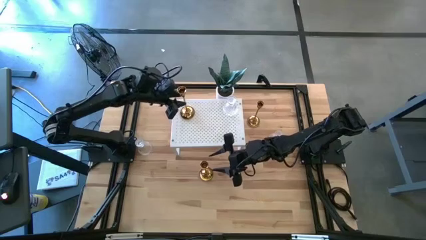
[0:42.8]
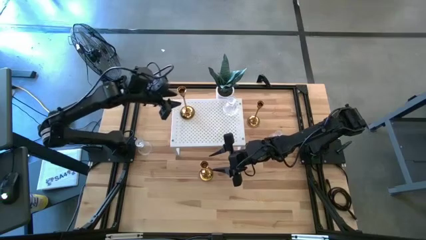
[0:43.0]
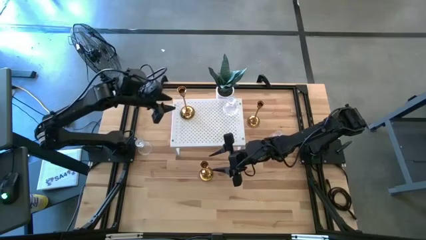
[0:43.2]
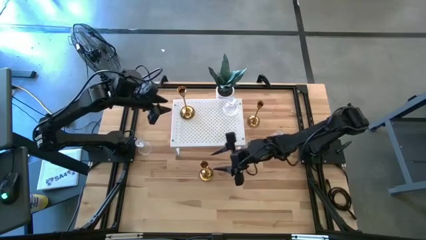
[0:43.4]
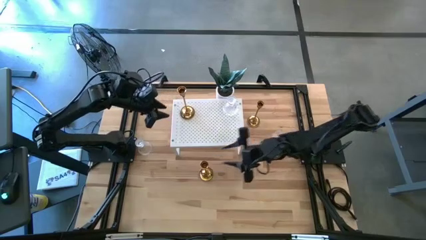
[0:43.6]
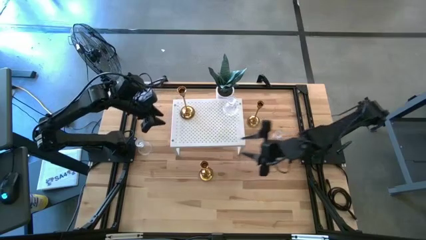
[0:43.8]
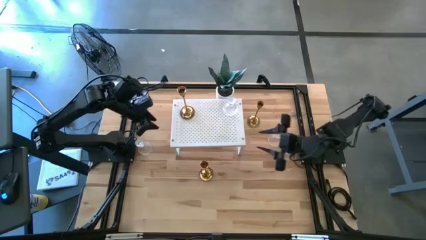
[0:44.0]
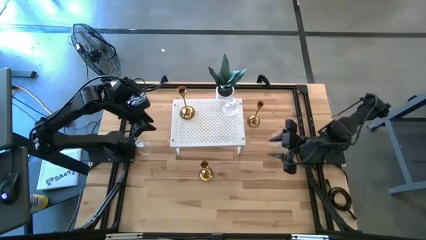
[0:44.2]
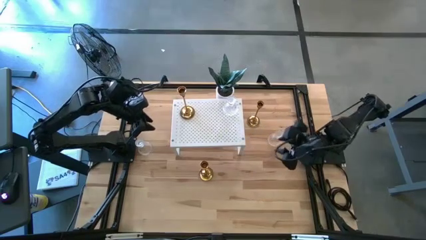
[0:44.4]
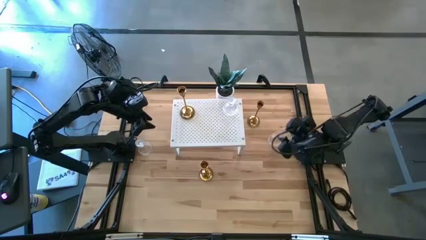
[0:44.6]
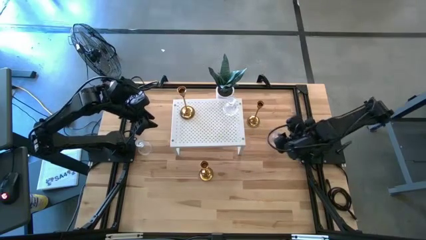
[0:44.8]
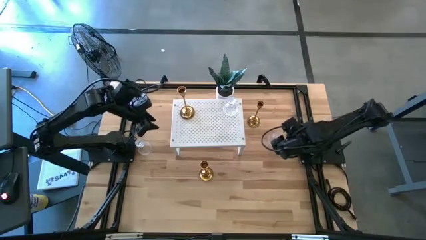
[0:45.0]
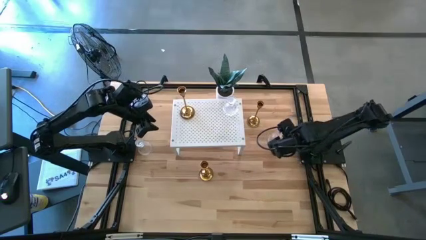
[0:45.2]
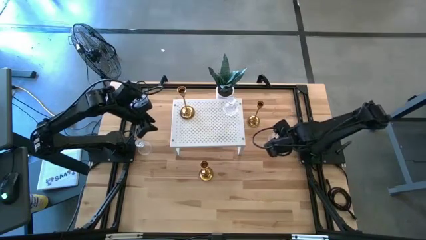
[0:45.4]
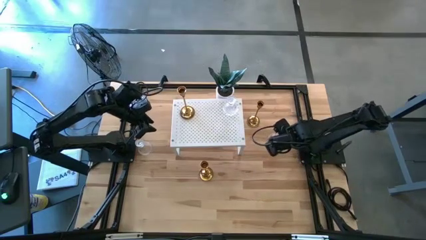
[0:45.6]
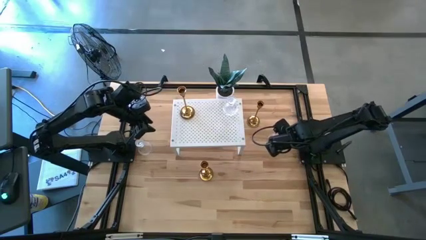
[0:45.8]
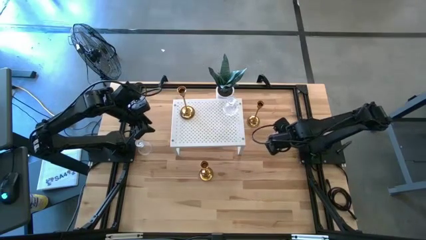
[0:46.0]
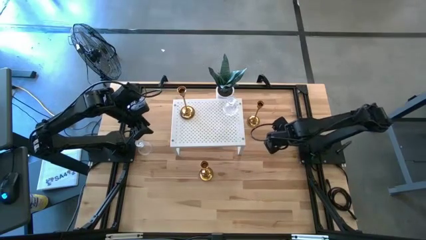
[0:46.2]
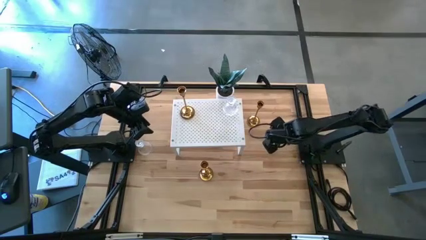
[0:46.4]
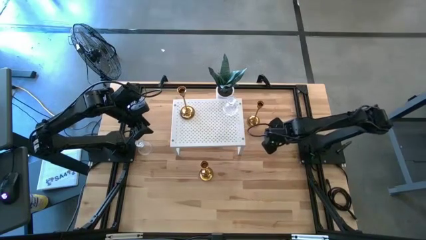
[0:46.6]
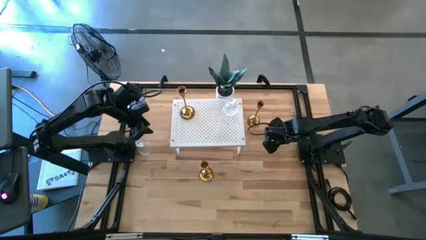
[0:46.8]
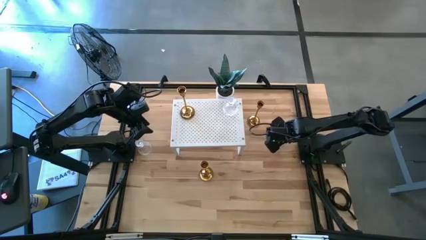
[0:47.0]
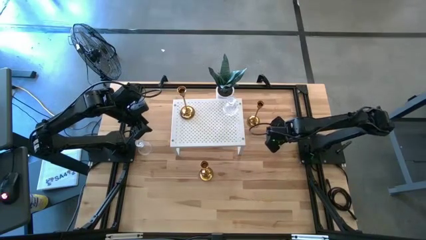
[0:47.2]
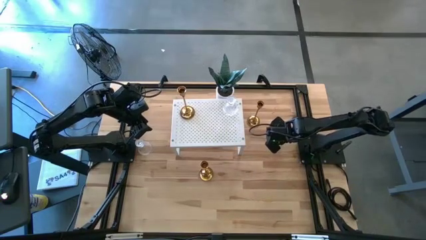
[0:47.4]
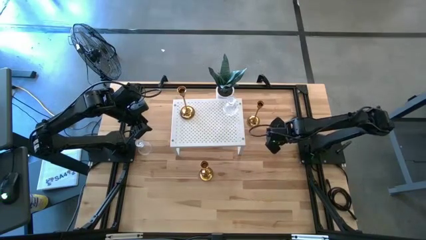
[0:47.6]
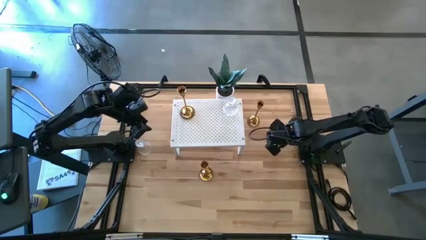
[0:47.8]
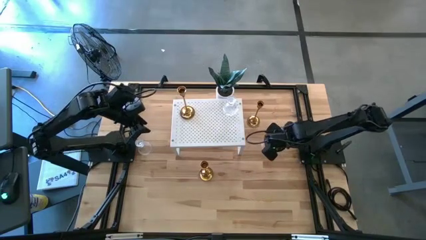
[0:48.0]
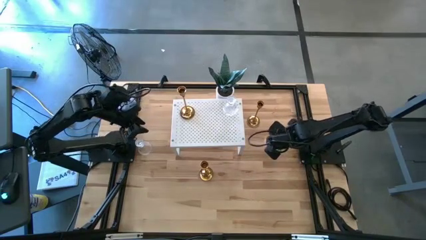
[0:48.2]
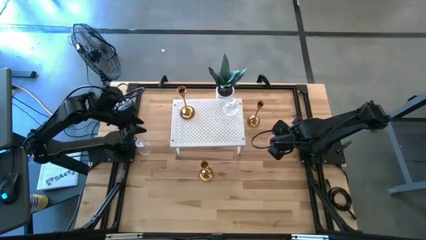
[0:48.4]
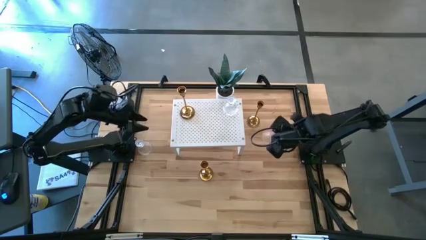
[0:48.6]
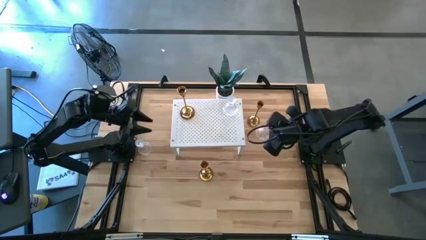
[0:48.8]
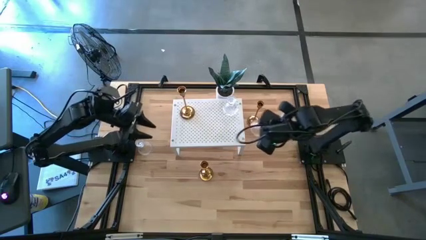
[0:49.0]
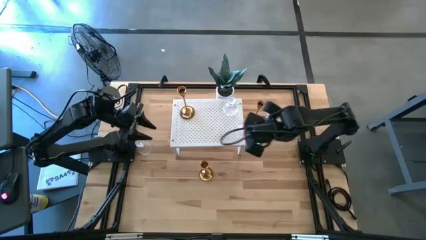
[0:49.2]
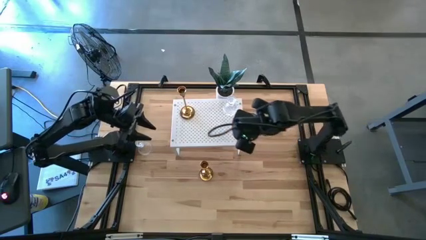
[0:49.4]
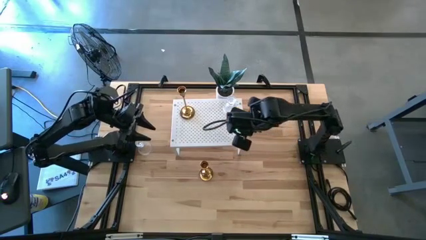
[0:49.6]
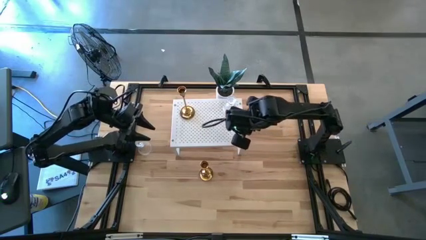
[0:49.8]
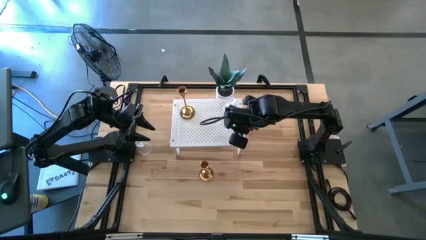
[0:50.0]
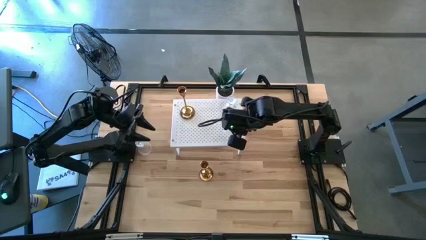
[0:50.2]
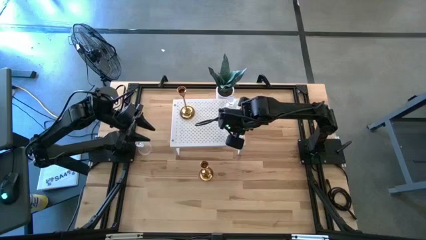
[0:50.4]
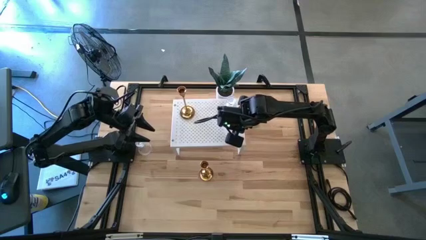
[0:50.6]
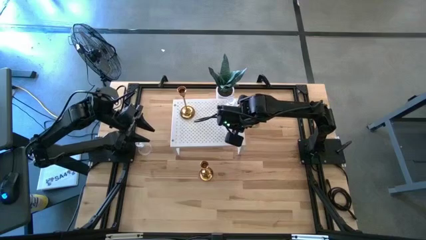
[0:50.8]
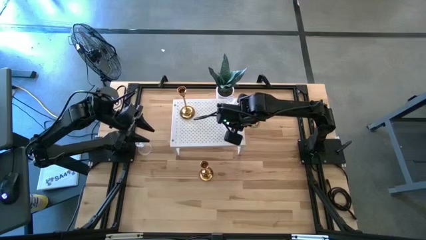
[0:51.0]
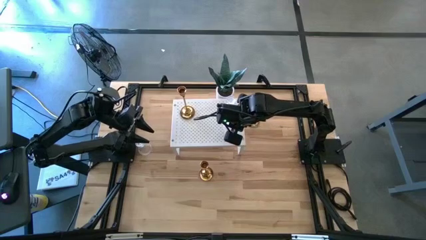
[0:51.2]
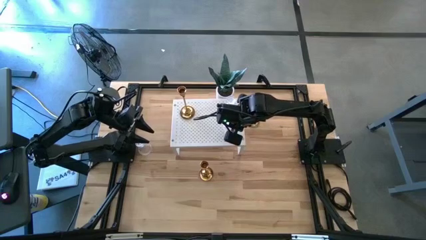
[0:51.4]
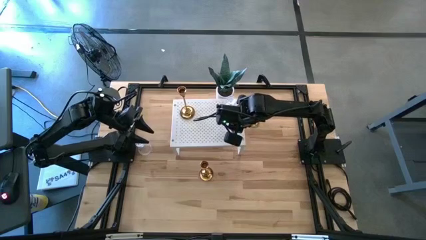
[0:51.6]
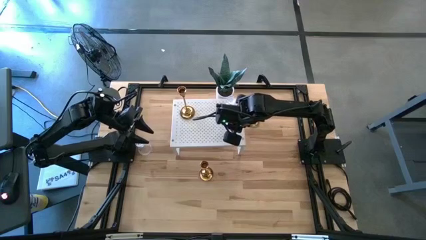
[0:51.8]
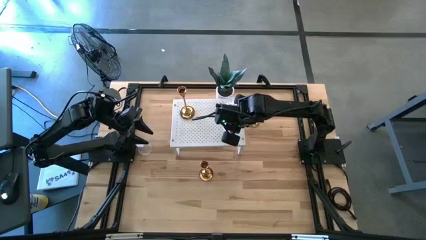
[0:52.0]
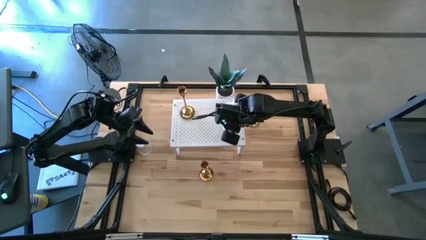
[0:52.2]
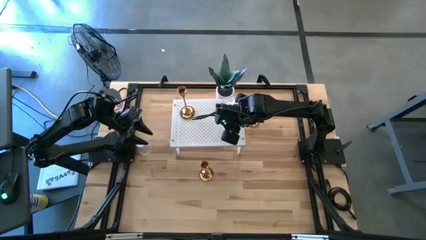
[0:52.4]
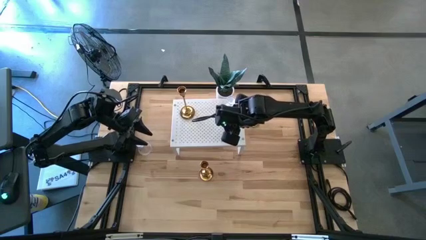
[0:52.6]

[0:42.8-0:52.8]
Task: Pick & Place candle stick holders
Put the right transparent candle holder on the shelf aligned with the other transparent candle holder

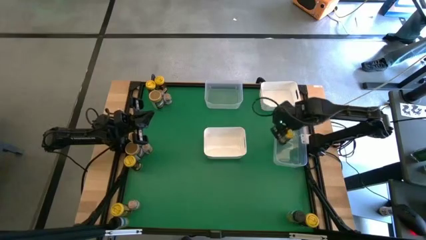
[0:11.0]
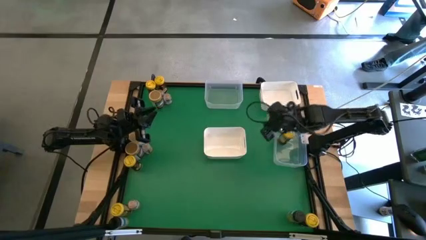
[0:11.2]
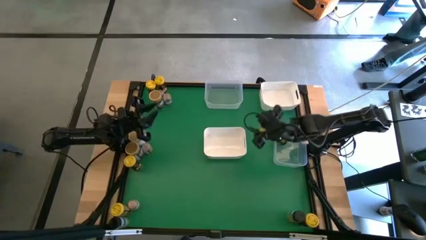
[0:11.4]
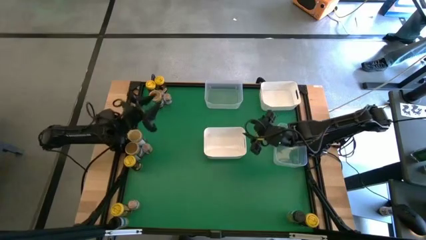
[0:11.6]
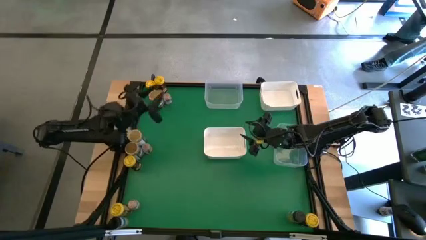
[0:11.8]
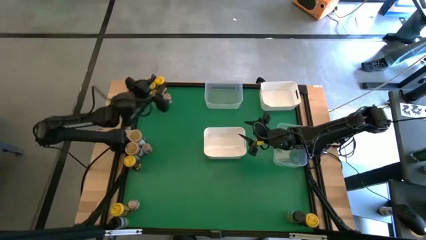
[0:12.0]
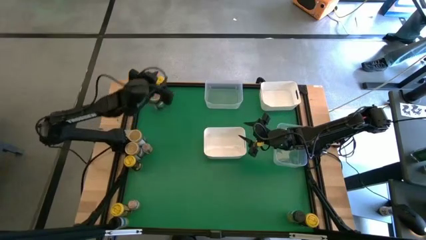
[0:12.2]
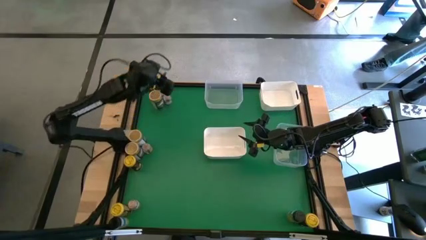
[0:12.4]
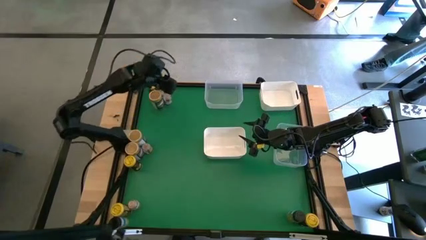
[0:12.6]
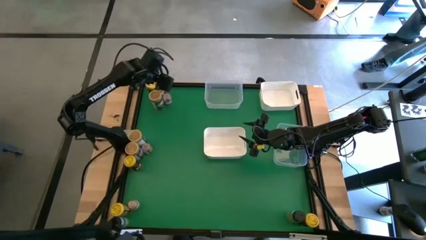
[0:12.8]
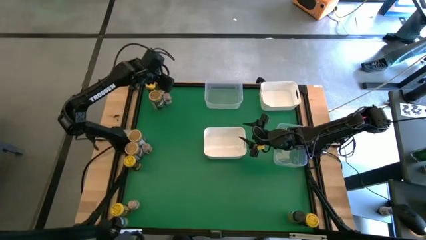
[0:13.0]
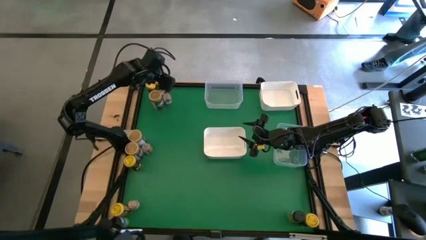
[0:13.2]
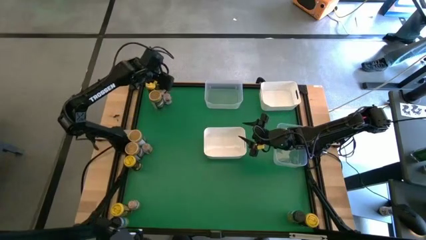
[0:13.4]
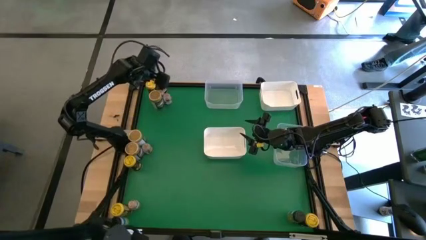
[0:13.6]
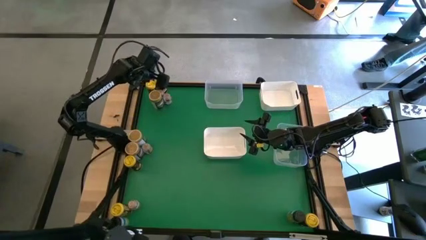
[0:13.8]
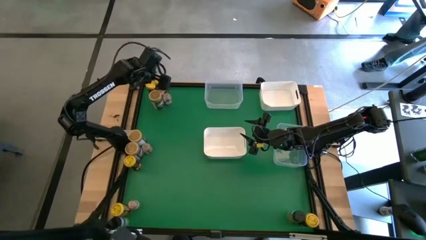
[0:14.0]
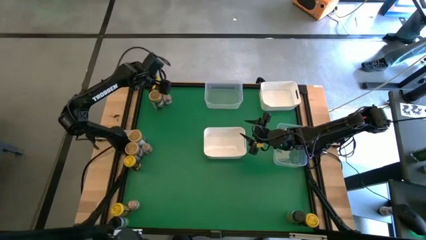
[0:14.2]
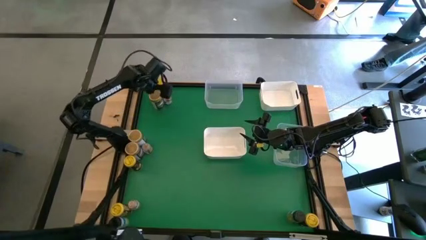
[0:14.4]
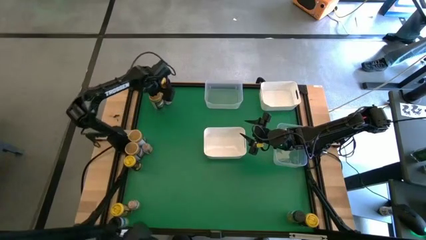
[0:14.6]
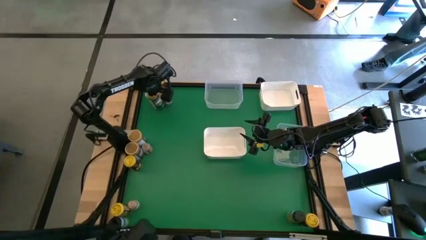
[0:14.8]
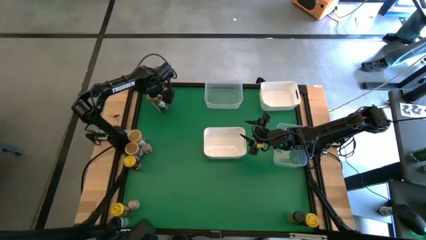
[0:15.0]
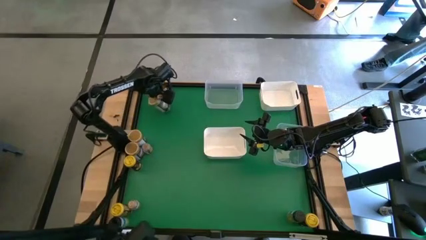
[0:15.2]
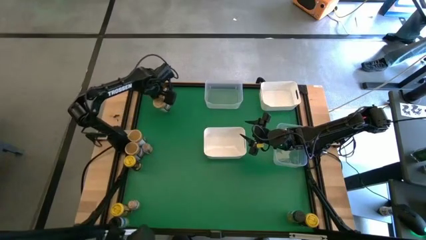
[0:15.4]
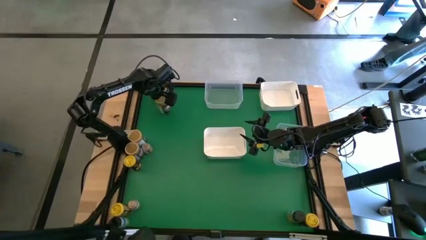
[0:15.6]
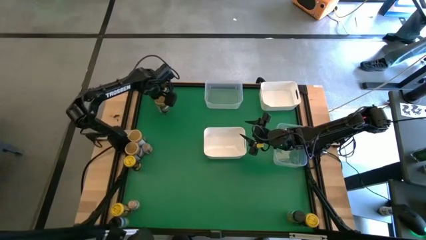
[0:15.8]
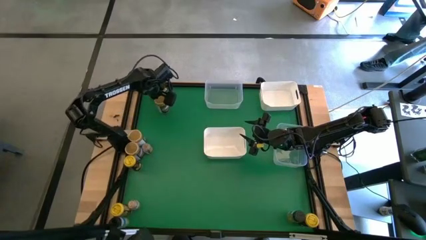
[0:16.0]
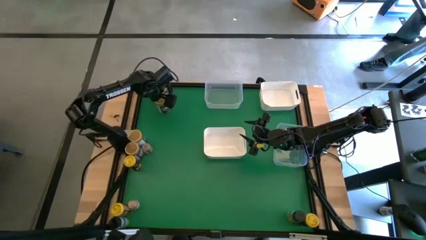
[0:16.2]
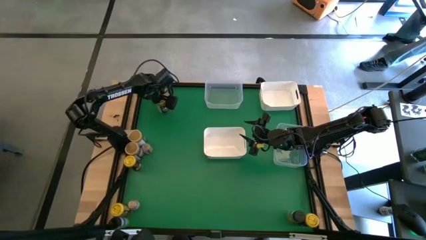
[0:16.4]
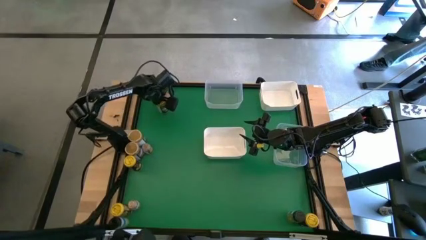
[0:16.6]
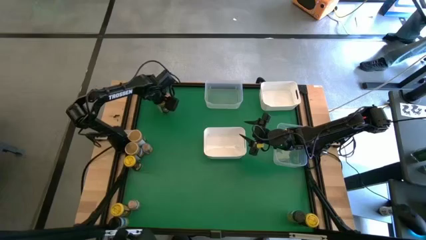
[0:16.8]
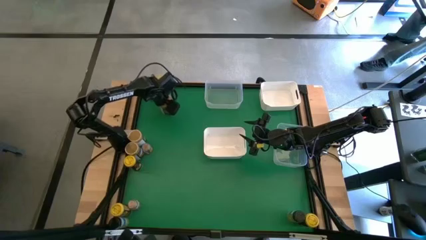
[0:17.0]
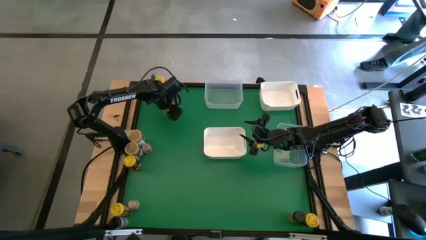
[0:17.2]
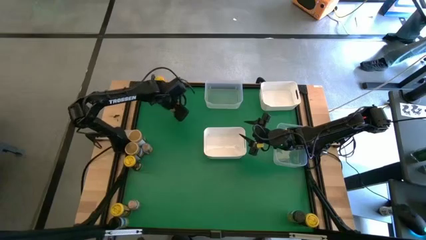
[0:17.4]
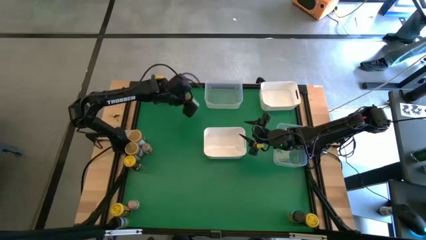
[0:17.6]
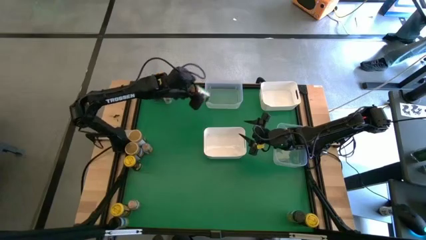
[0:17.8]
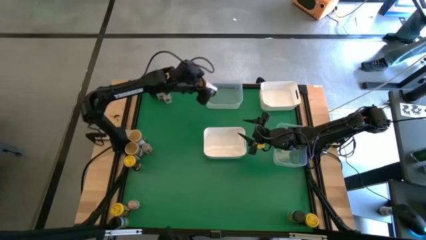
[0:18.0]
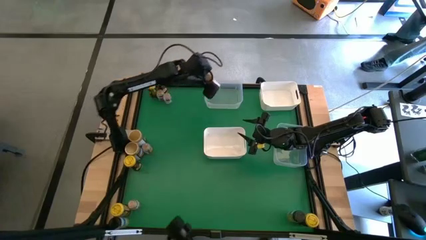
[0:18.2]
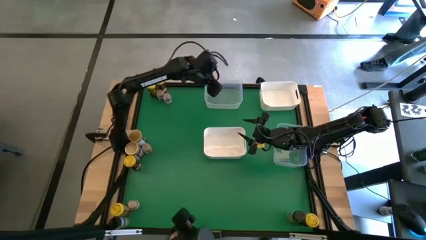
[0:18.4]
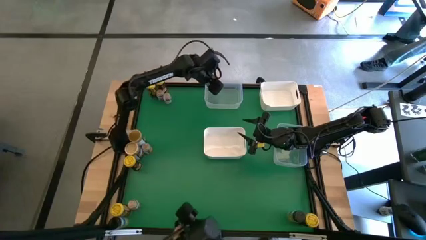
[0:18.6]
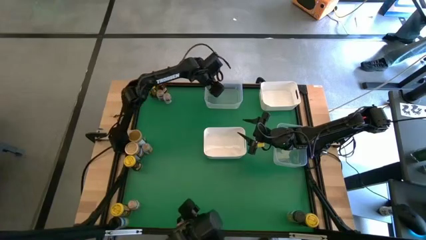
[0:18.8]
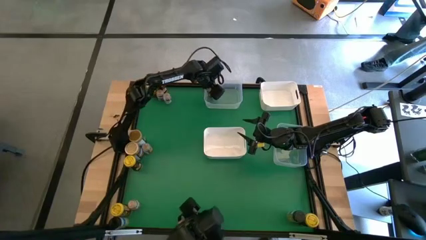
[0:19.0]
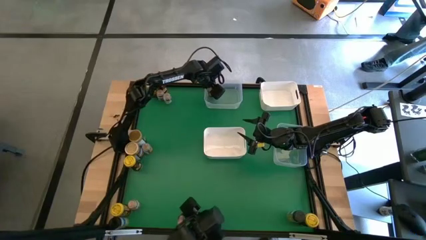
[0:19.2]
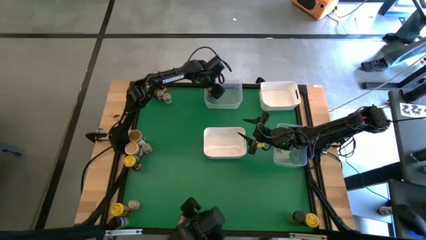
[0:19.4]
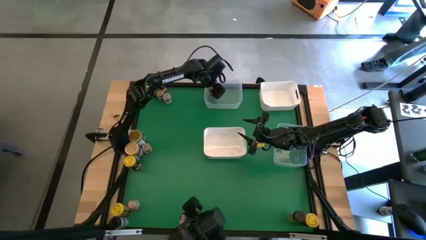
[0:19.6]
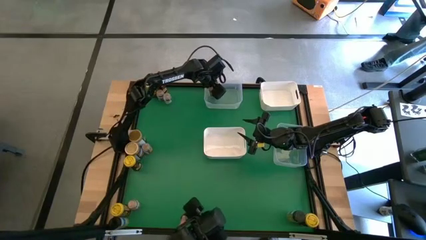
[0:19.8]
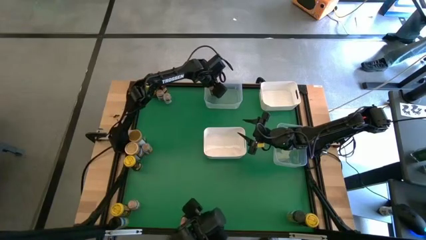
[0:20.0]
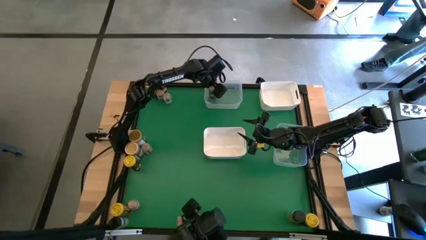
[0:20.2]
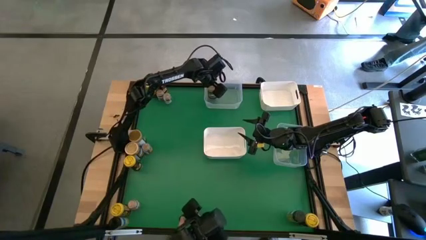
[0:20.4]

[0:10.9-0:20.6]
Task: Sort spices by type
Put the golden seasoning bottle into the top transparent bin
